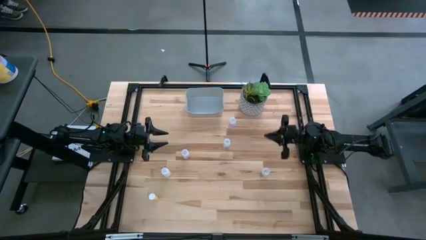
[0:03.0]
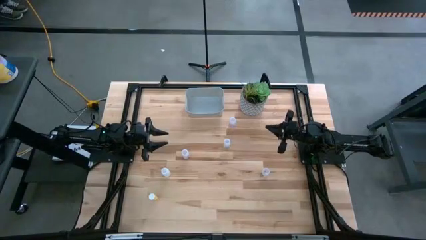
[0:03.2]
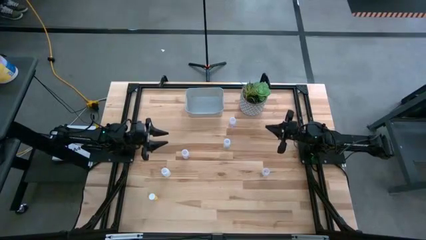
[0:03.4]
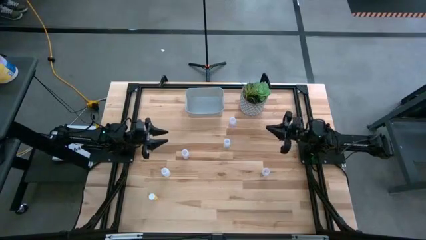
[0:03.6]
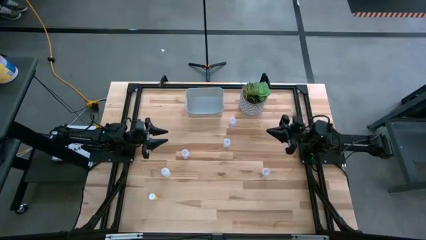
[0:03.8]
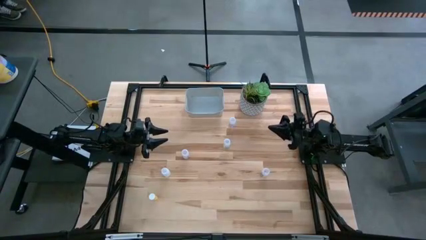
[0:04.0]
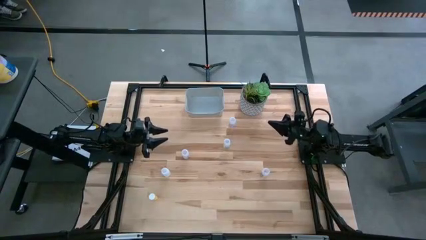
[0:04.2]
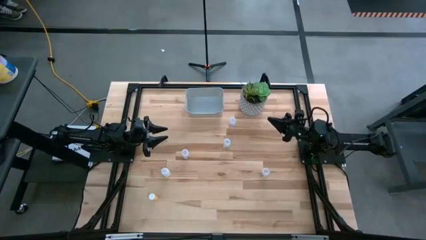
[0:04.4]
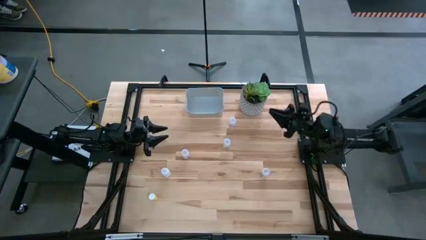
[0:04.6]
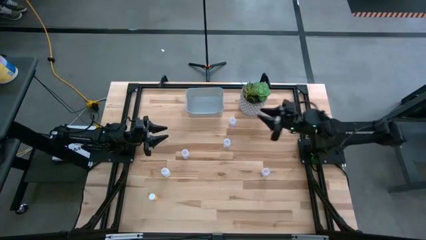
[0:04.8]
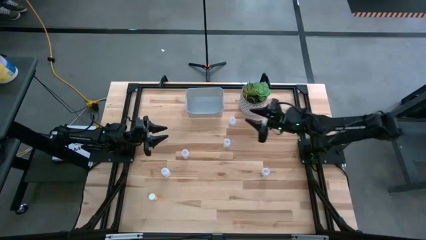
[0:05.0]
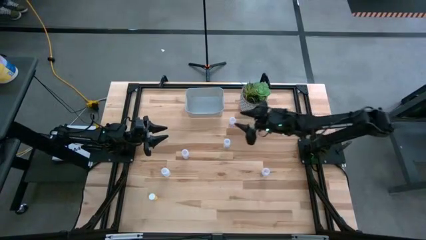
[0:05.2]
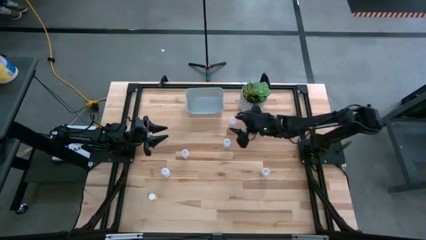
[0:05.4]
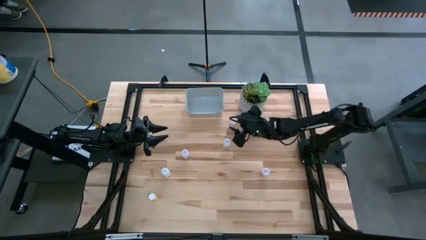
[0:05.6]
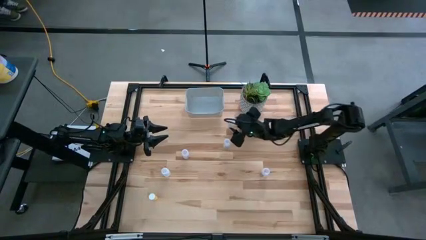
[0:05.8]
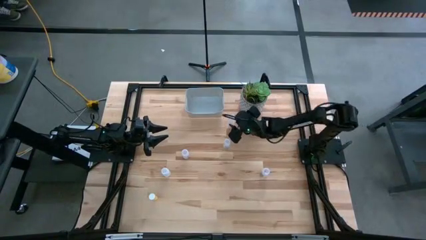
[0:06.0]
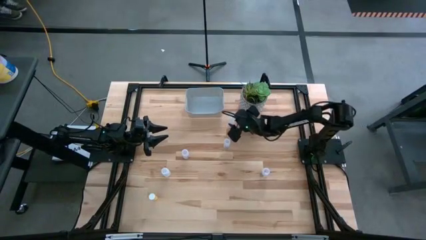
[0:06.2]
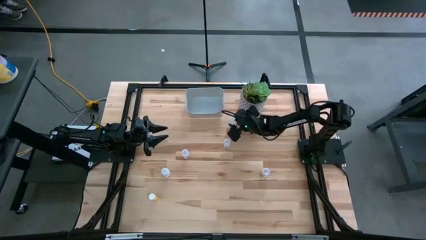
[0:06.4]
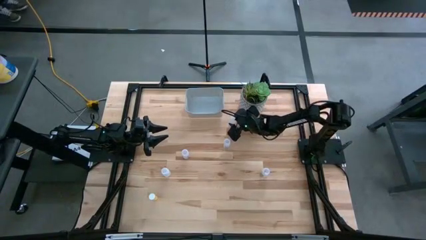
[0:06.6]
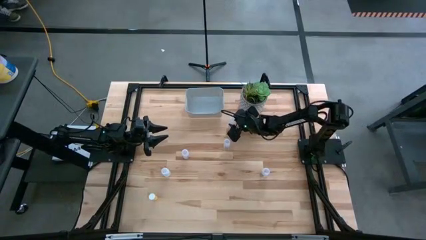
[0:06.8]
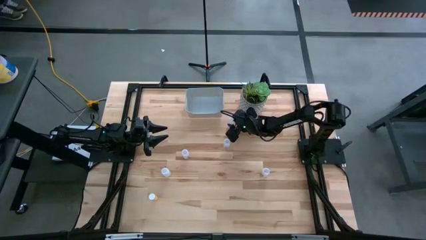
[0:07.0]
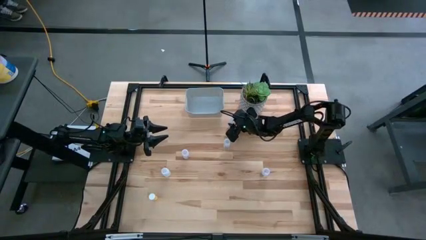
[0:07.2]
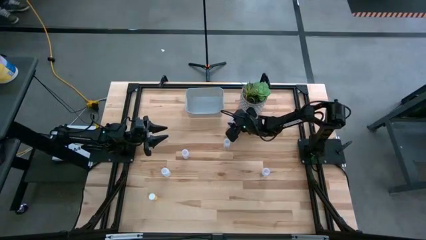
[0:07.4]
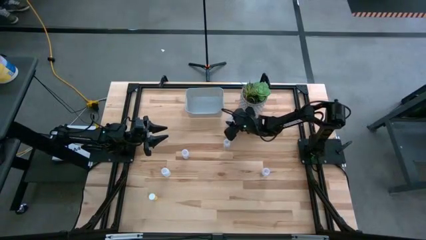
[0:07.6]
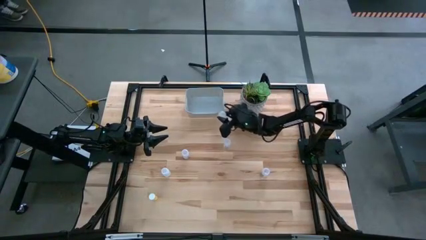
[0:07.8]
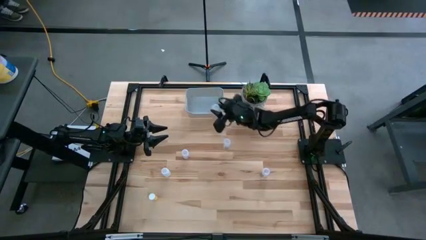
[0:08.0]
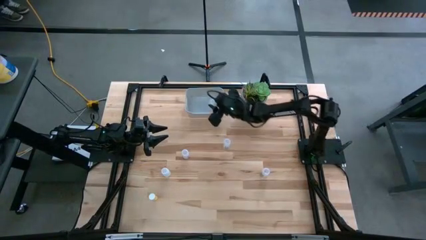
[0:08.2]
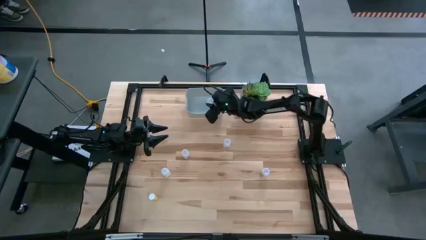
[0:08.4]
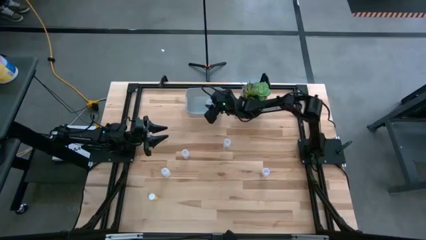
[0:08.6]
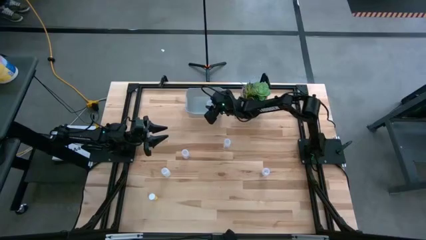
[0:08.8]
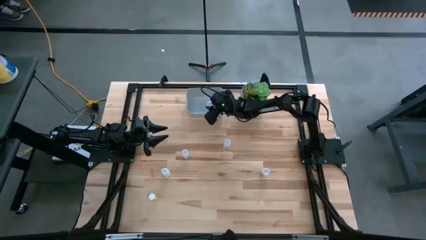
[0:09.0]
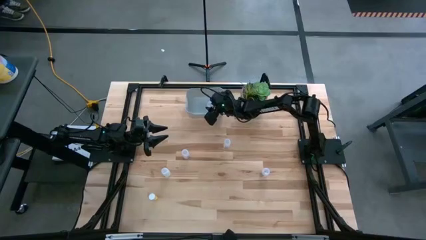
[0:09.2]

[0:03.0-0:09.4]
Task: Pick and place pill bottles into a basket
Put the white pill bottle into the gray bin

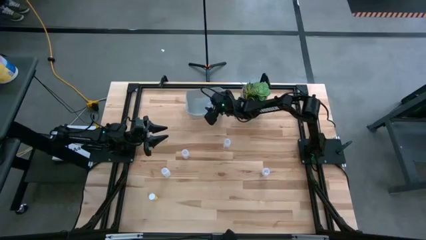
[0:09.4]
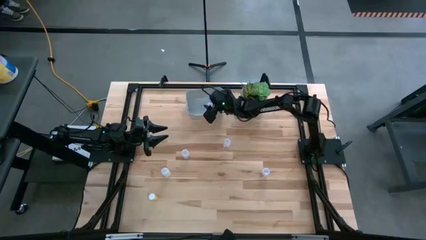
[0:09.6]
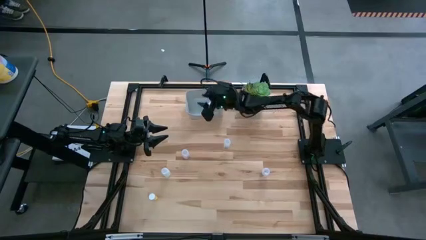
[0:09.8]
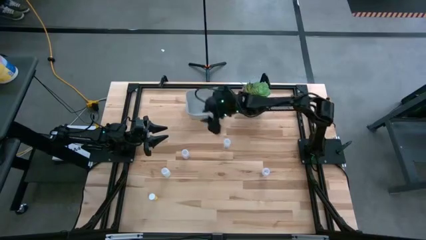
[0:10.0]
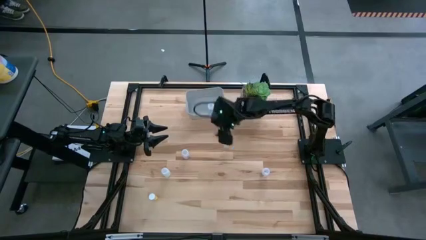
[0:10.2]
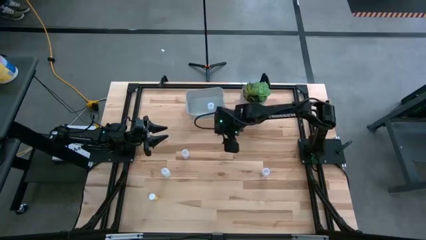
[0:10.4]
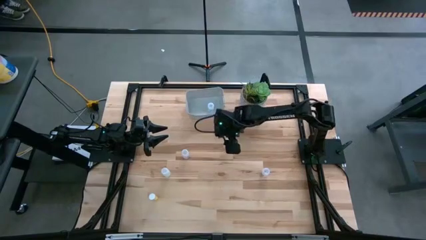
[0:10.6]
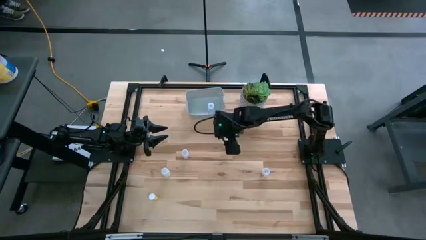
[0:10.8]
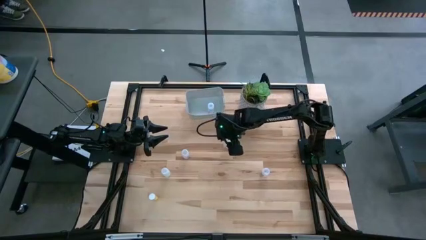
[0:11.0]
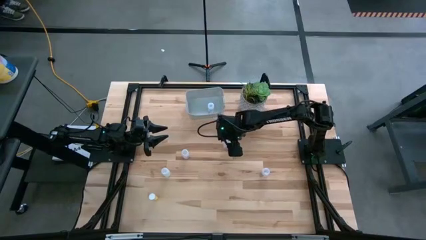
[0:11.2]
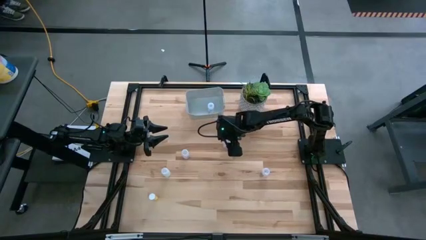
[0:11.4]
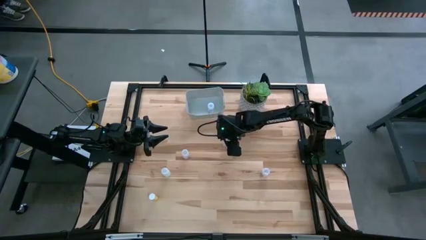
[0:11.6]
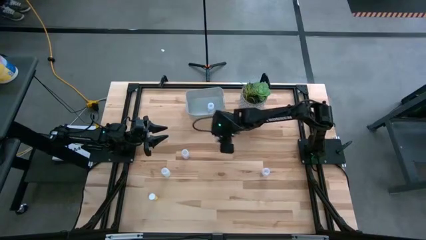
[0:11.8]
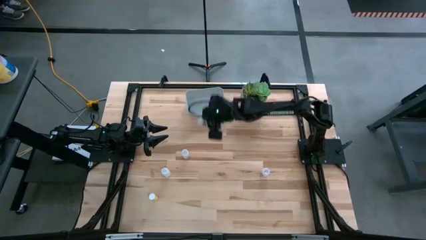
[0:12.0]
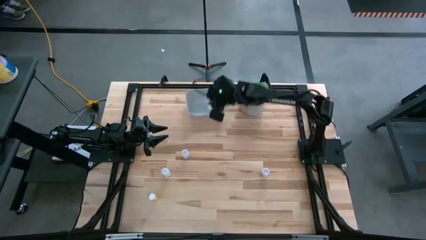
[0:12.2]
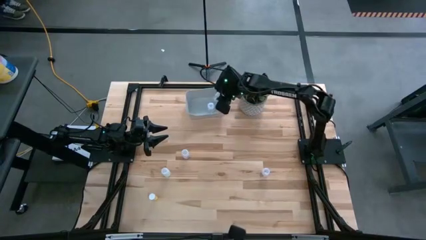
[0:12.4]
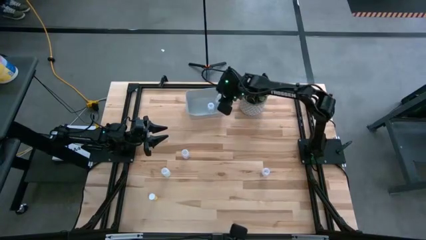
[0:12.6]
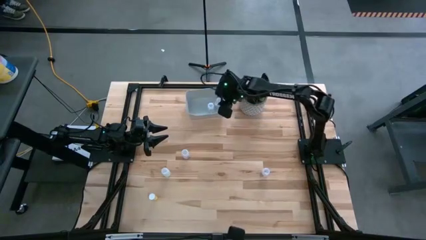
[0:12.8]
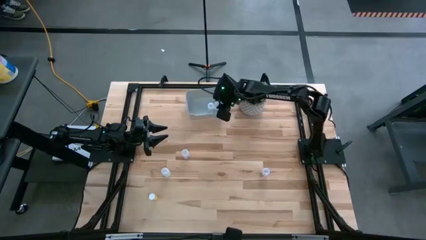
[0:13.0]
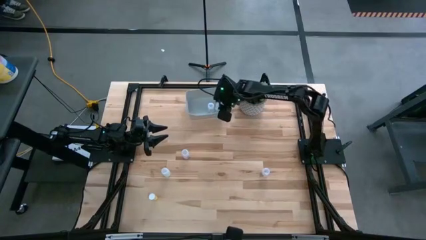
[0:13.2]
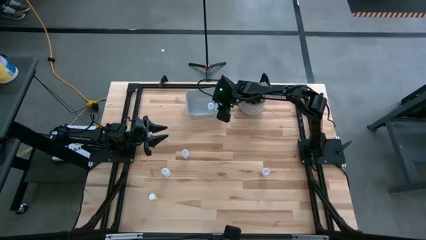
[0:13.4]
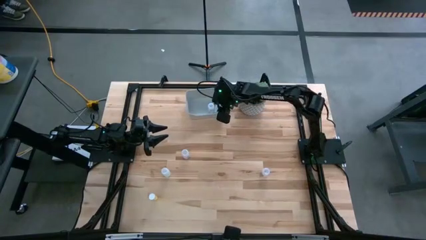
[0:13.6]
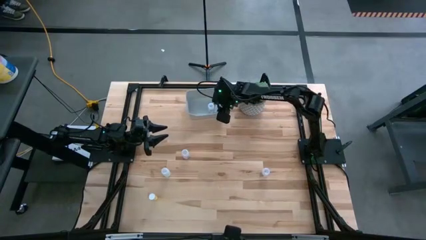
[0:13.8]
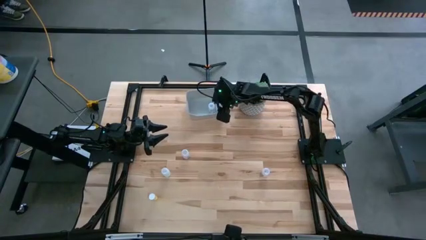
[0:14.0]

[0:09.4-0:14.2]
Put the white pill bottle into the gray bin

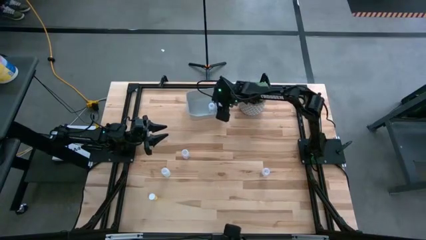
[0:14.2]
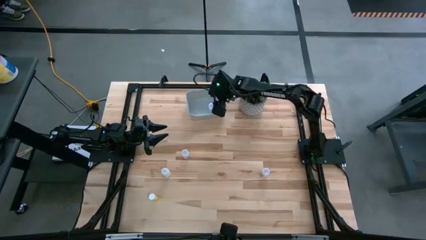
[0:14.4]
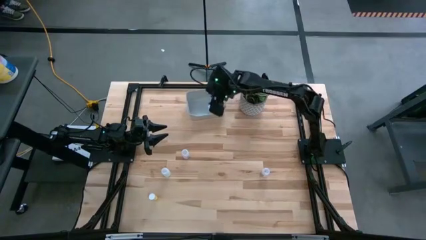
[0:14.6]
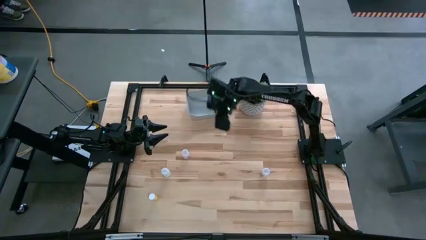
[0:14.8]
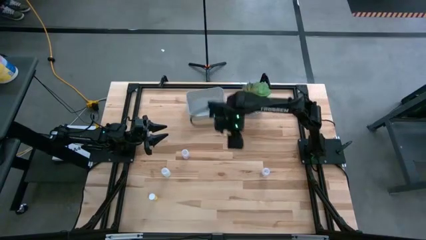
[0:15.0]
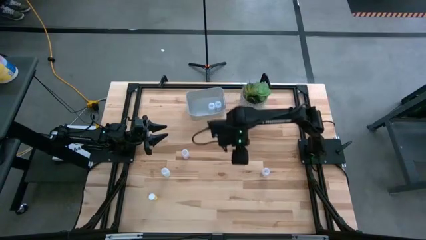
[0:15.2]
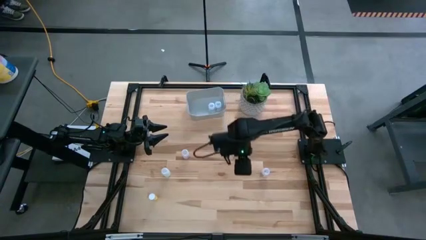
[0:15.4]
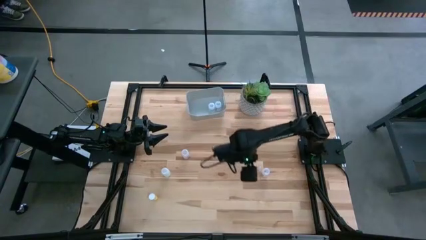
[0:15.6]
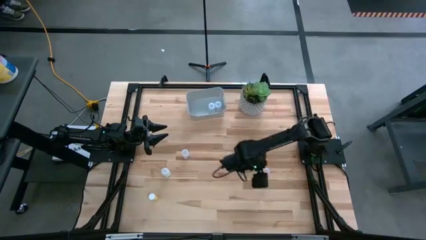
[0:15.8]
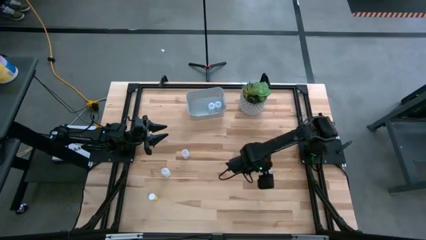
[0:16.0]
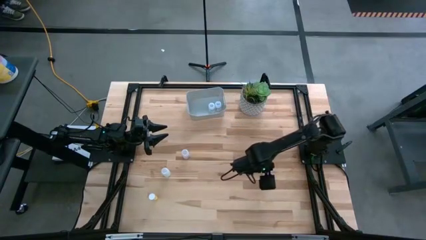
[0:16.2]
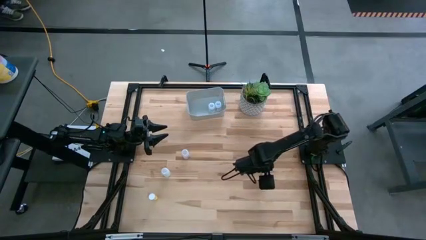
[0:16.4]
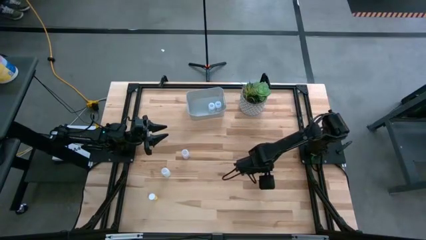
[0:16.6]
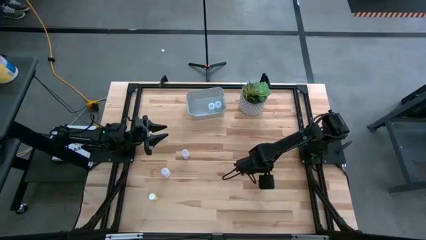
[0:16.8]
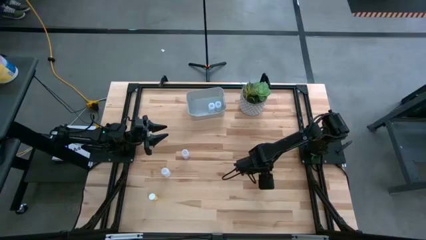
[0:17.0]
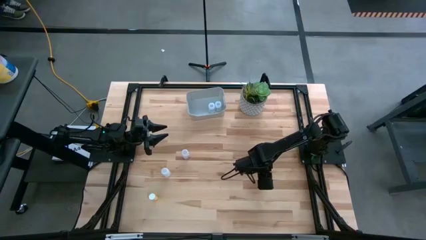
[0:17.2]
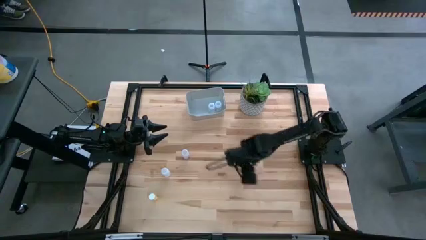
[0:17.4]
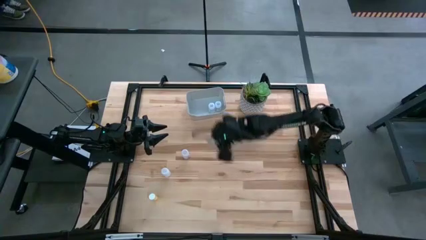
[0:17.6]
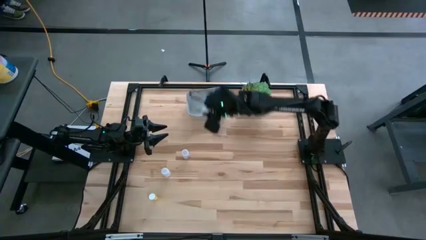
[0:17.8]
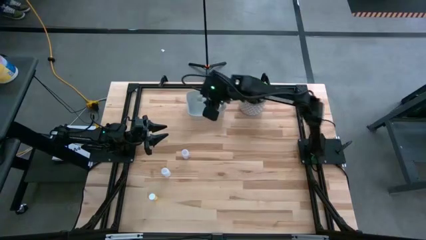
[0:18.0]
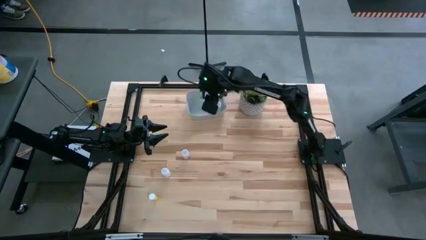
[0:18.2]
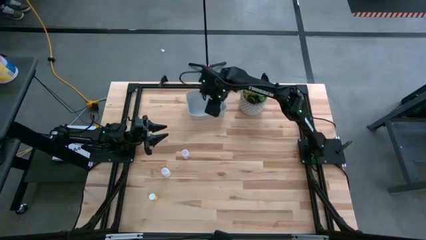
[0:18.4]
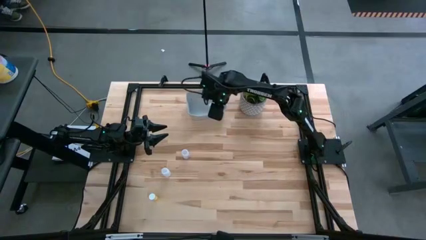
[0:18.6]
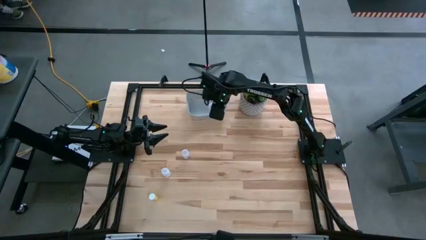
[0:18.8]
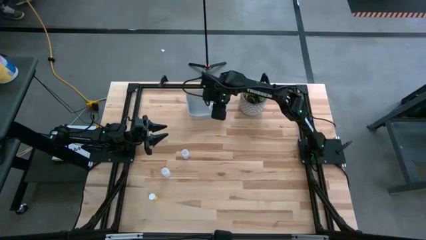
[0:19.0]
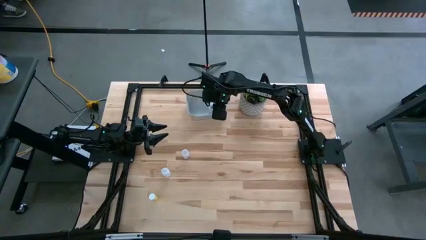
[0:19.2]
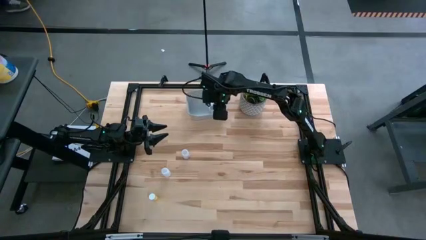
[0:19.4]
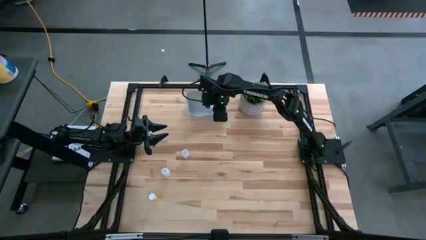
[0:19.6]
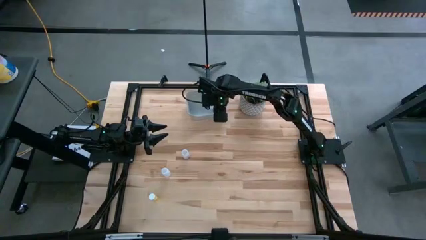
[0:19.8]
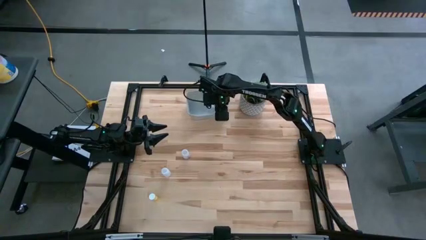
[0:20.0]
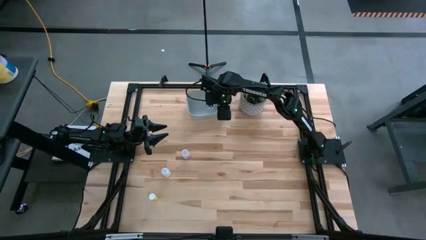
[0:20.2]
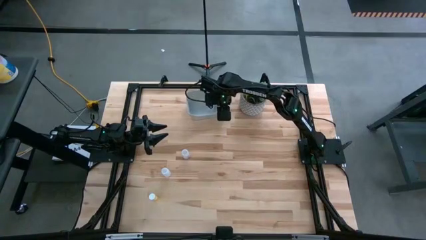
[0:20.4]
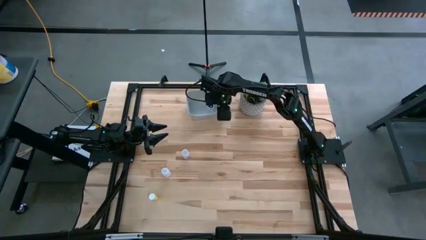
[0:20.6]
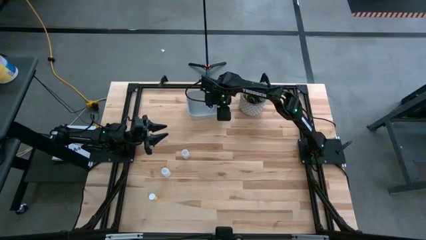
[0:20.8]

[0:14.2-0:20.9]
Put the white pill bottle into the gray bin
